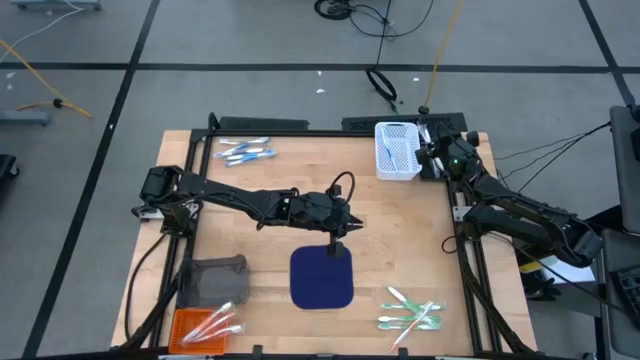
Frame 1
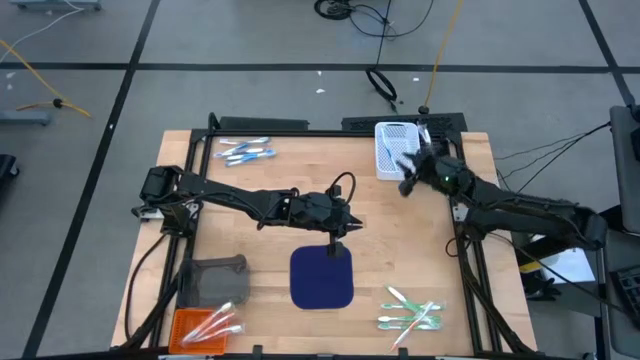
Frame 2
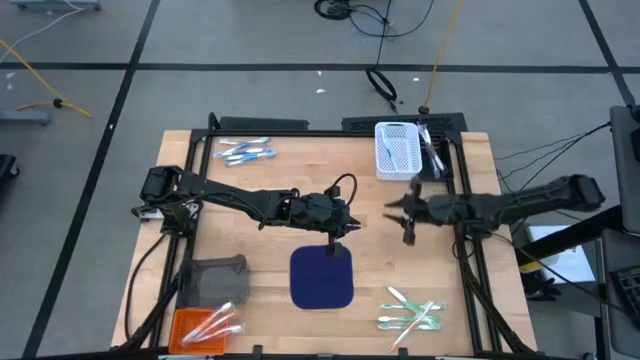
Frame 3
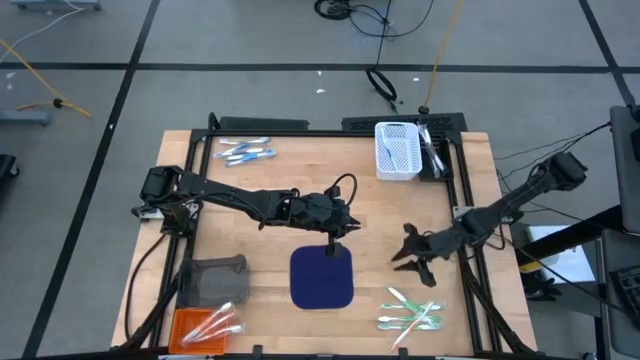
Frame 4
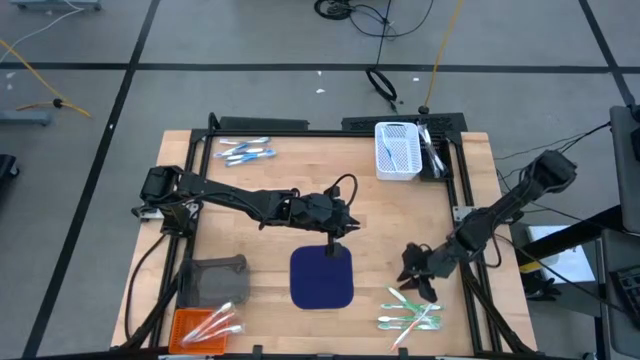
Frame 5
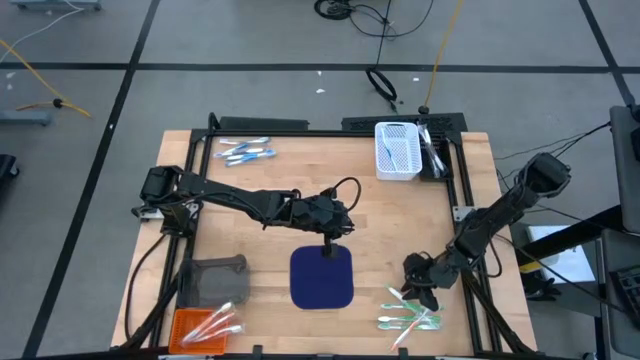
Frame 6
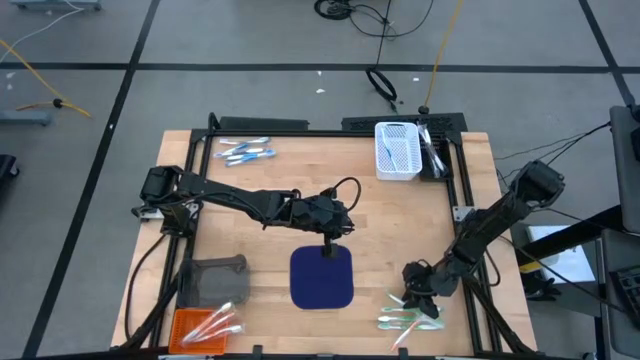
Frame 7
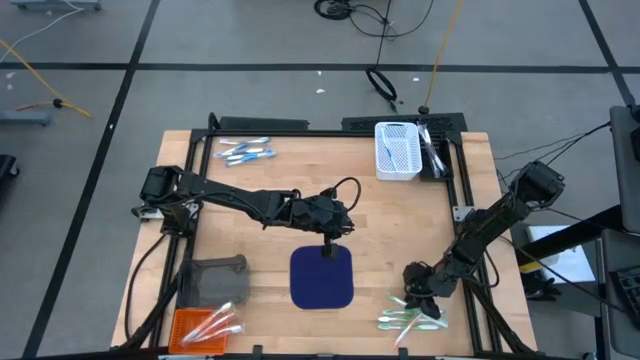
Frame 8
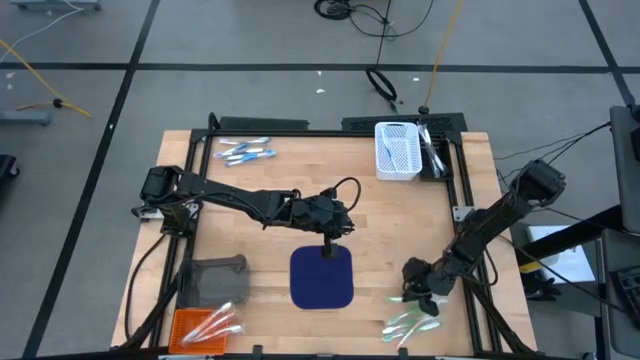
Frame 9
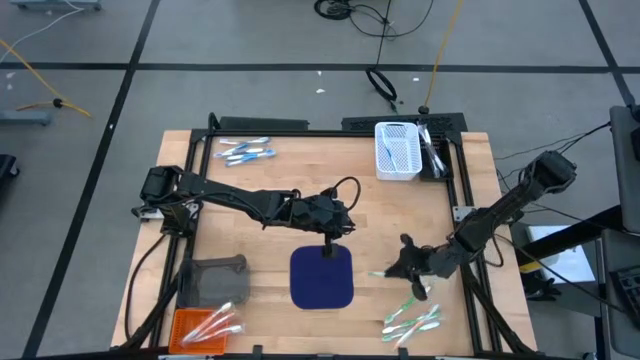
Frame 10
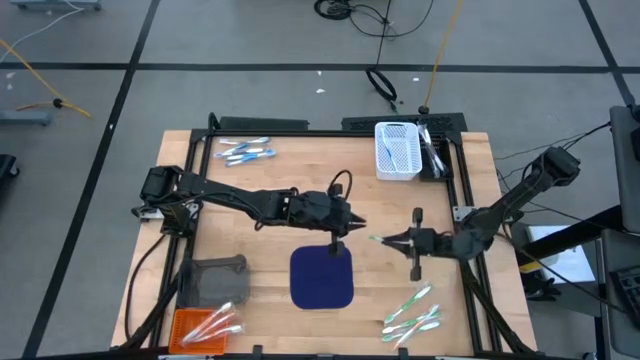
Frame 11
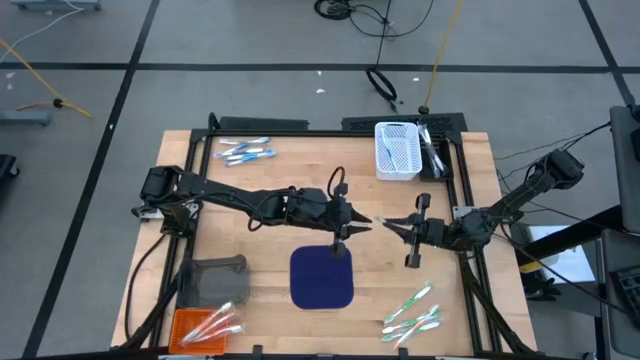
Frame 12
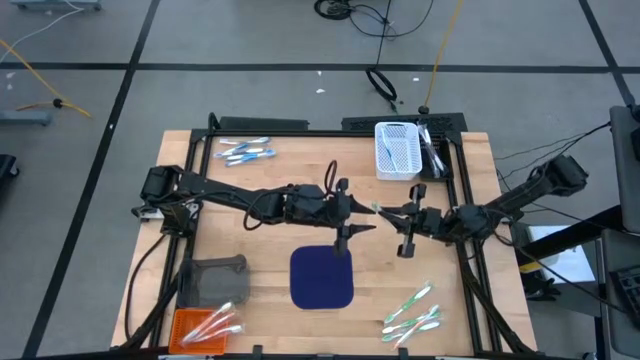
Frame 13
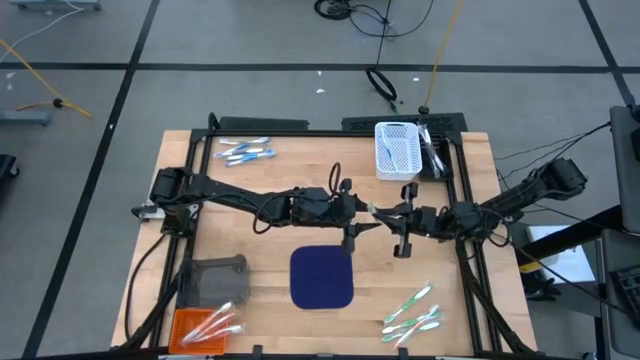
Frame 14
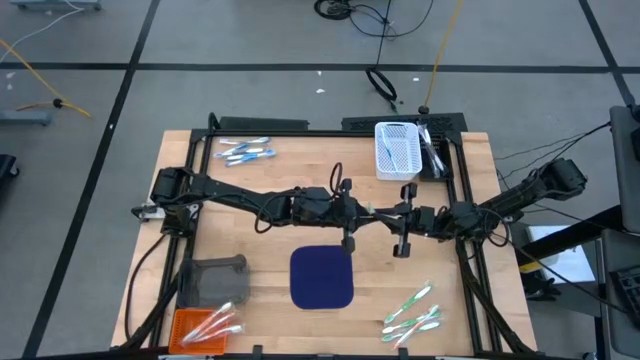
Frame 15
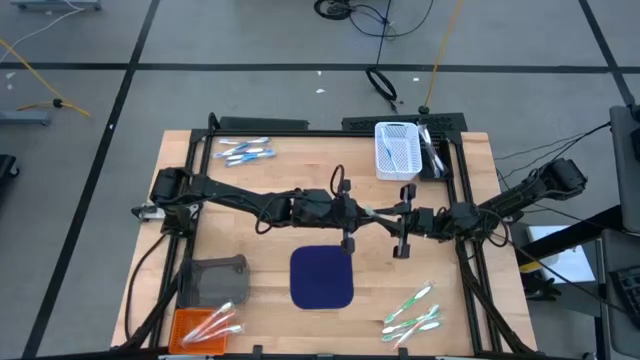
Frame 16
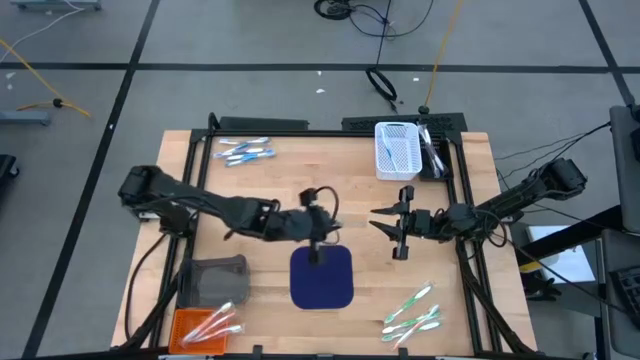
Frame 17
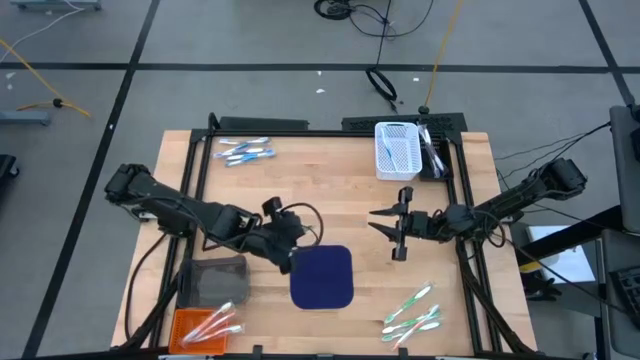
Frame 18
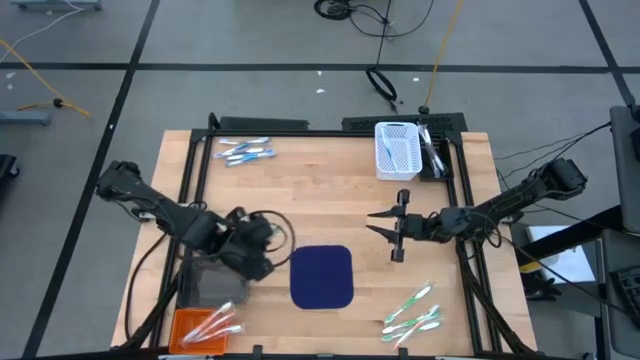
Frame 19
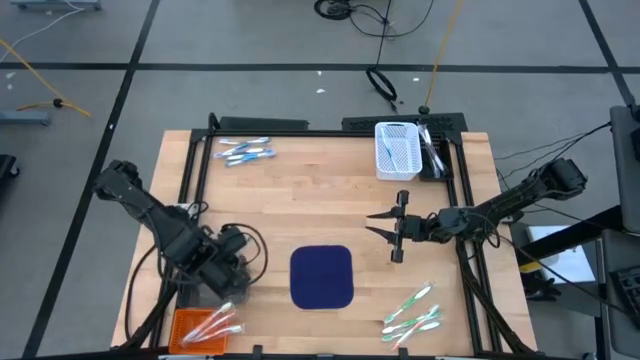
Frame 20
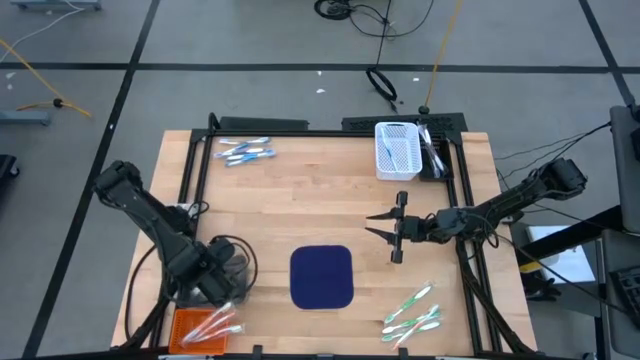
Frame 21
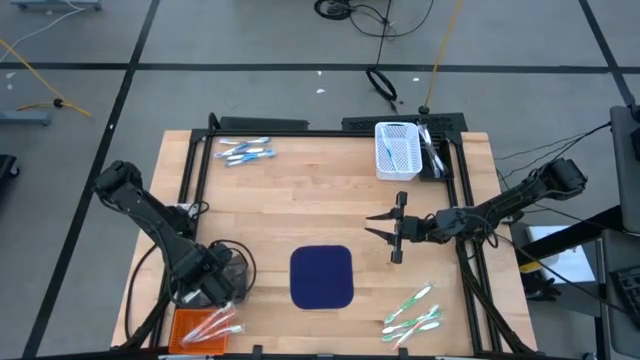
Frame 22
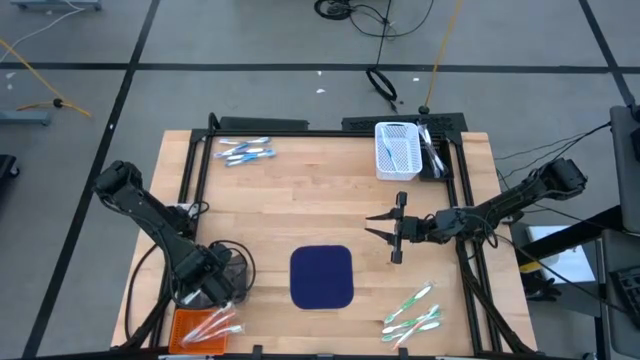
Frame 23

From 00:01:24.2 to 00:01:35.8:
Task: Pick & Place Toothbrushes
Put the green toothbrush into the black bin

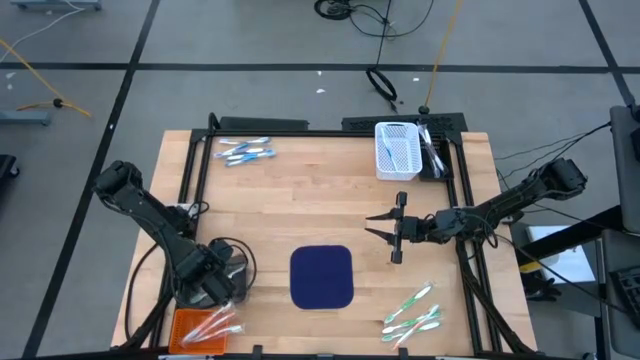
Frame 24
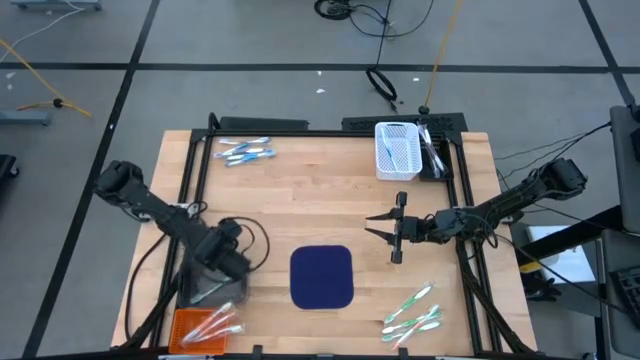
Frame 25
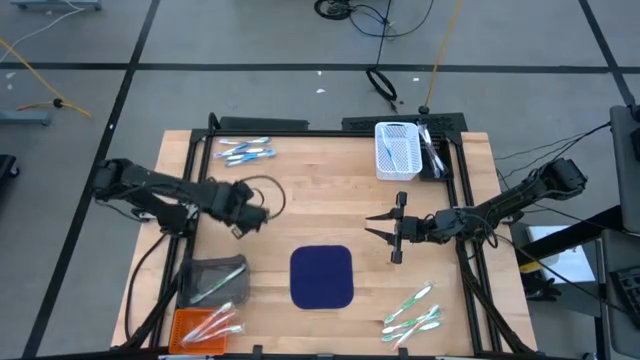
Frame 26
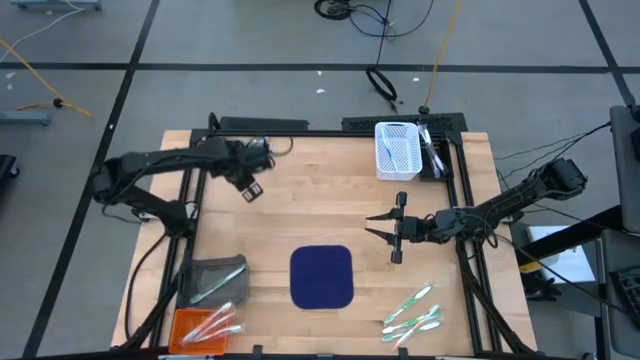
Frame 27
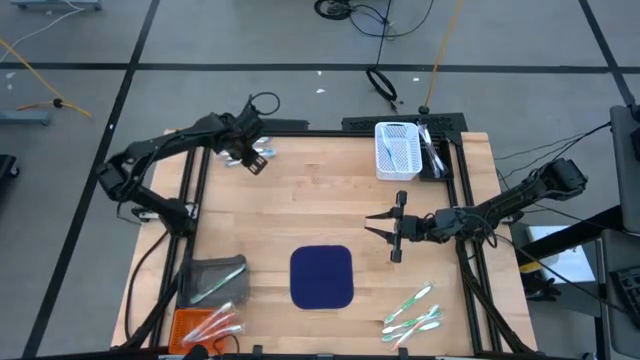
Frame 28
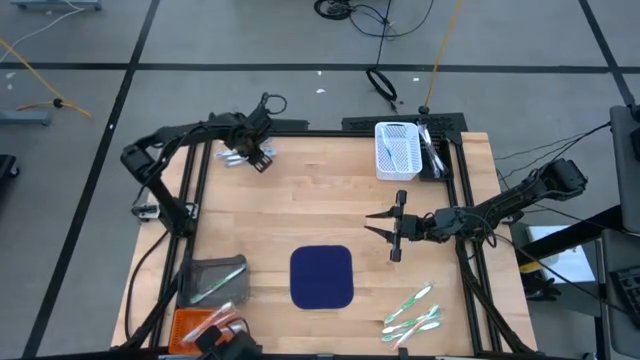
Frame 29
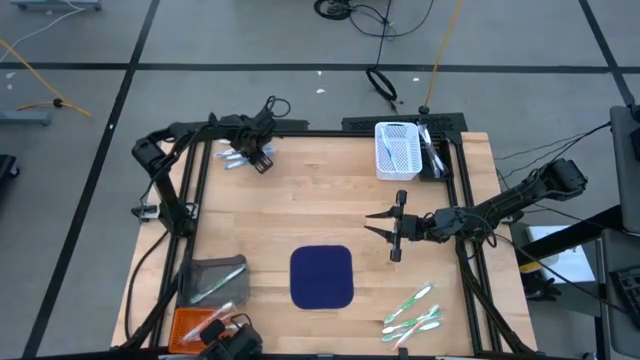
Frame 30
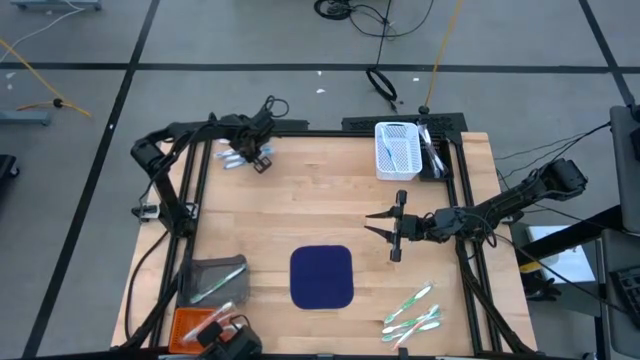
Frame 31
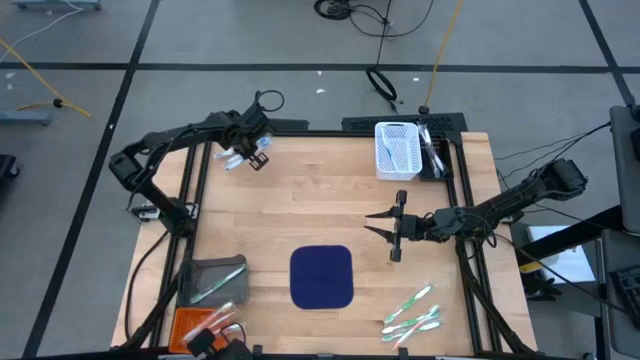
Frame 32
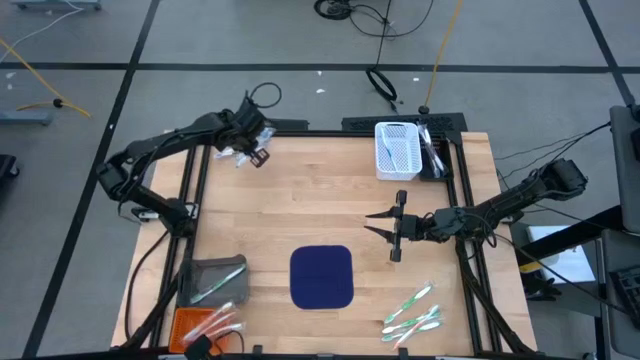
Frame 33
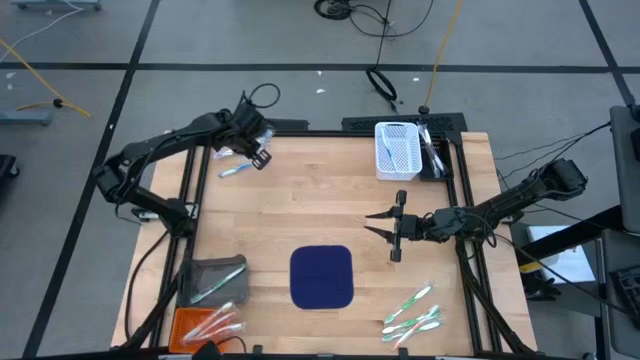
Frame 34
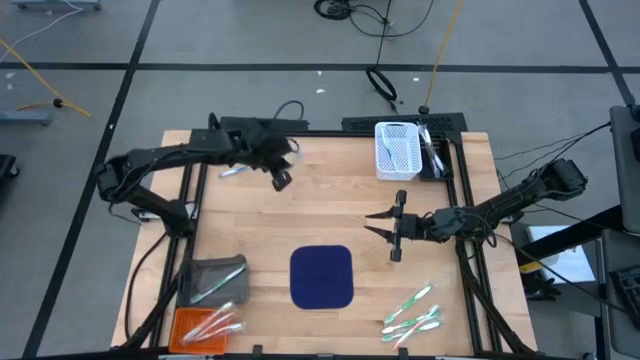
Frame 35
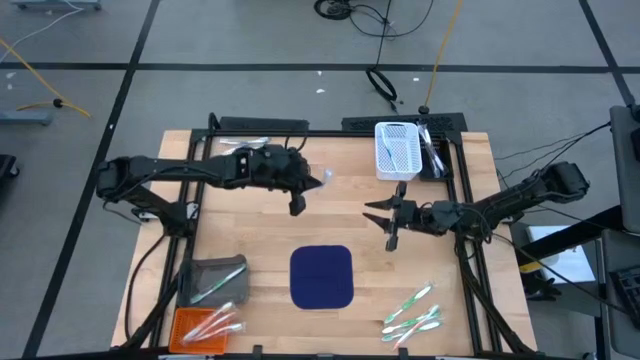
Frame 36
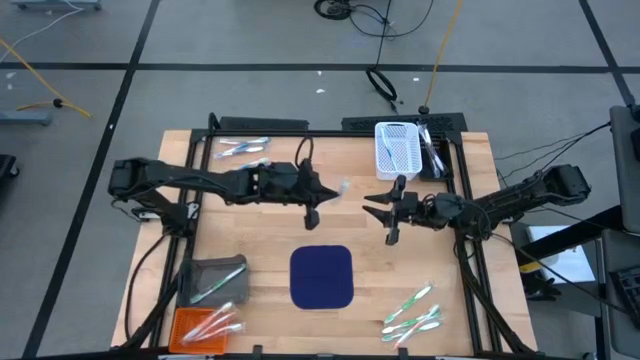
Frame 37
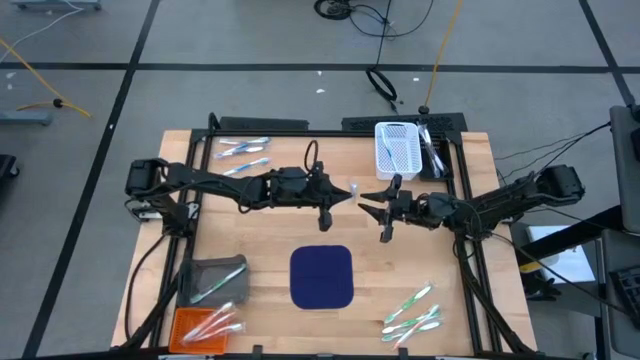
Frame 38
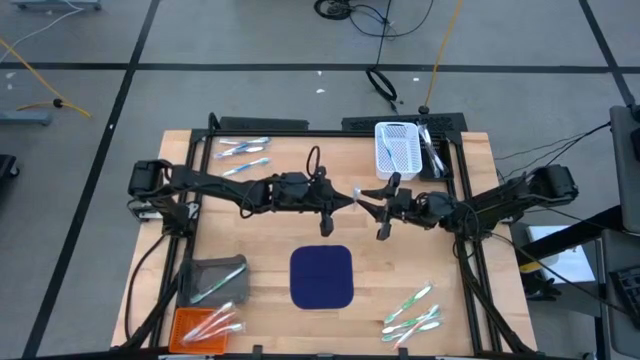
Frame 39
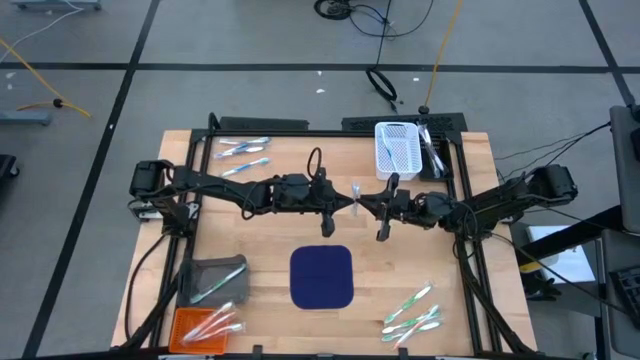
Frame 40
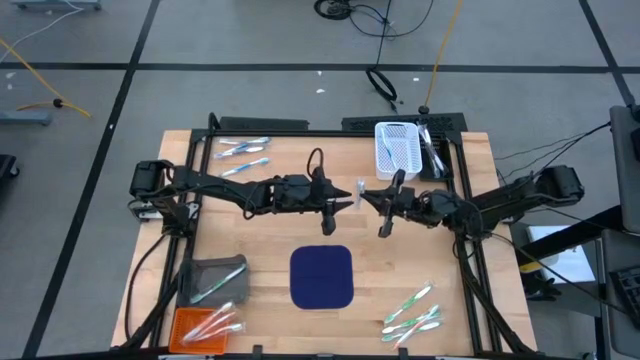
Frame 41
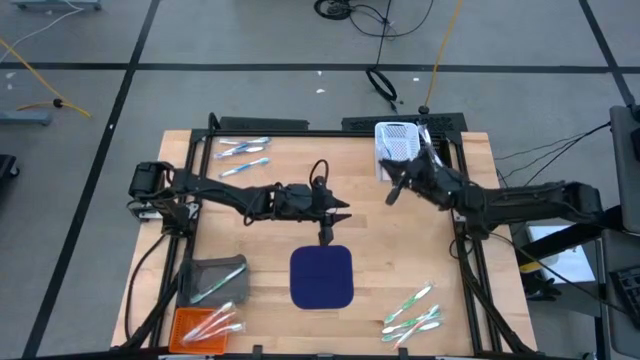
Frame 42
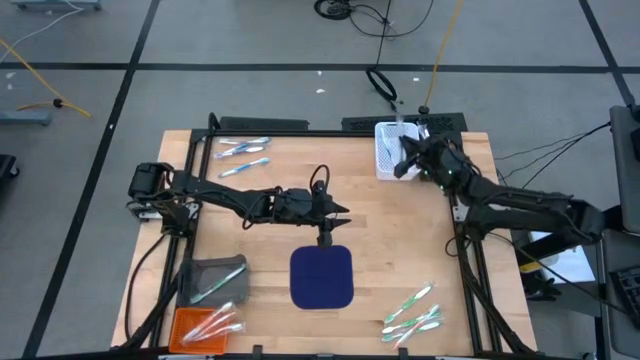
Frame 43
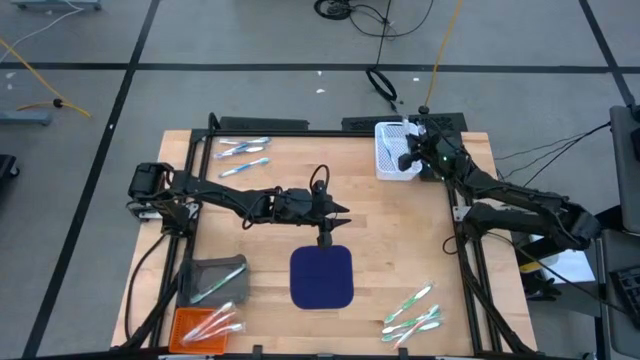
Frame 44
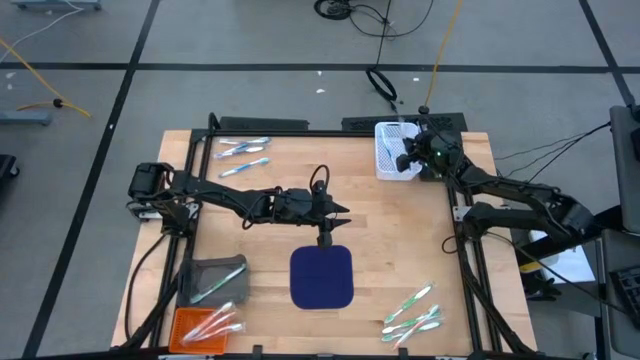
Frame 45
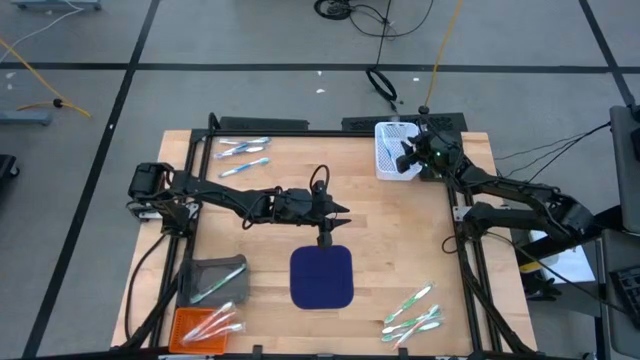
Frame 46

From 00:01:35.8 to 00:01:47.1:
Put the blue toothbrush into the white bin
